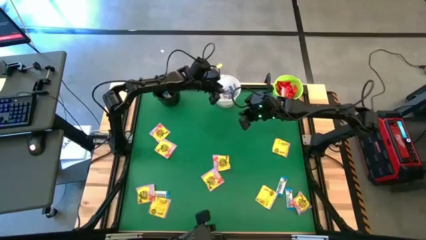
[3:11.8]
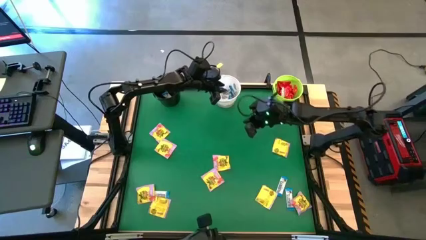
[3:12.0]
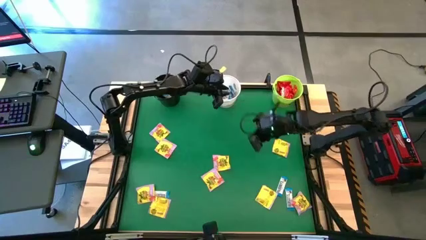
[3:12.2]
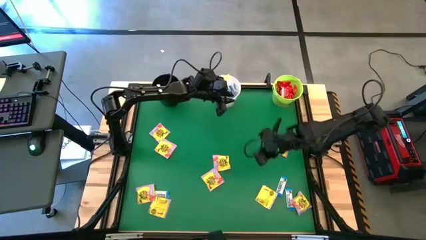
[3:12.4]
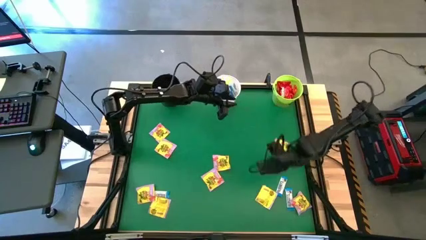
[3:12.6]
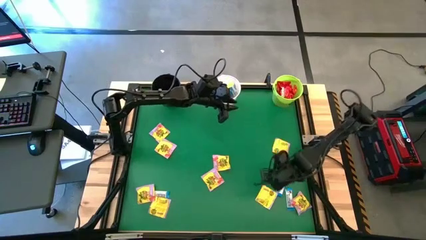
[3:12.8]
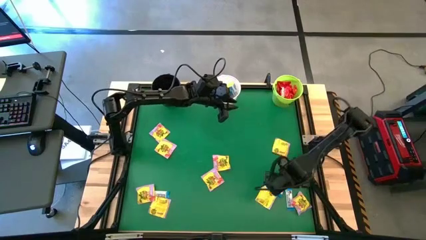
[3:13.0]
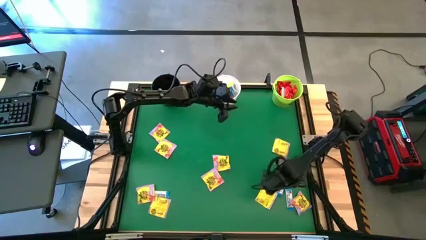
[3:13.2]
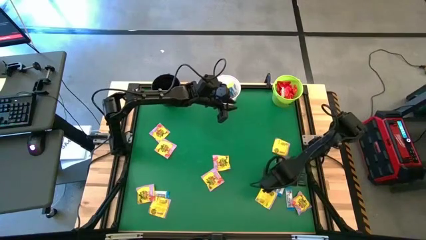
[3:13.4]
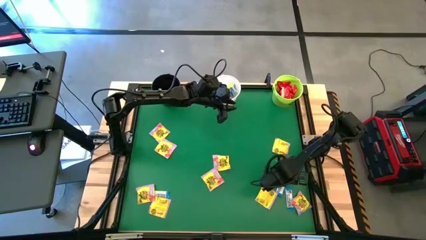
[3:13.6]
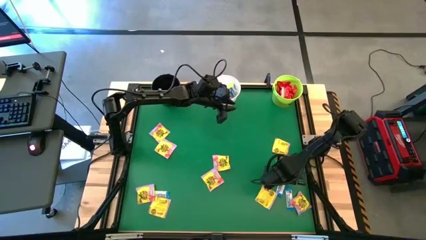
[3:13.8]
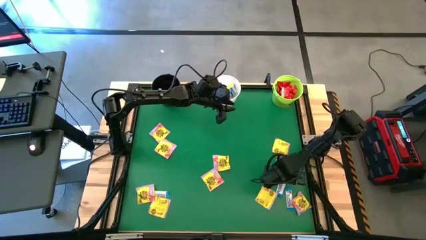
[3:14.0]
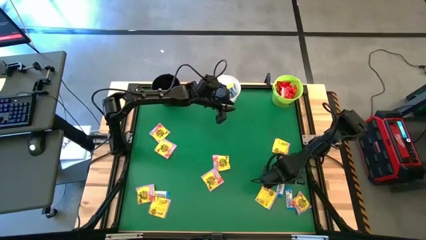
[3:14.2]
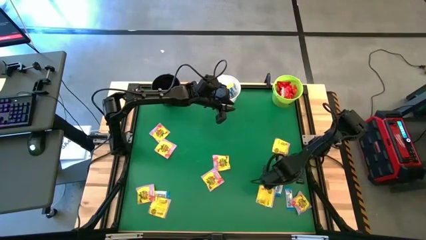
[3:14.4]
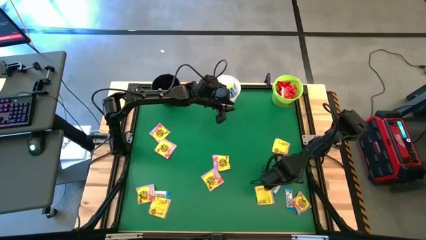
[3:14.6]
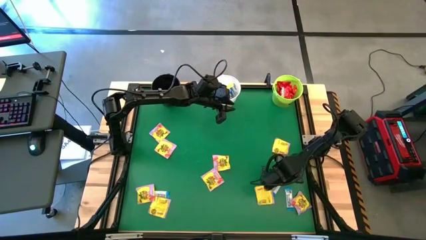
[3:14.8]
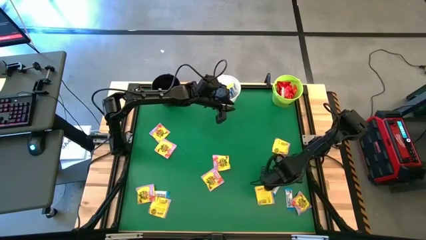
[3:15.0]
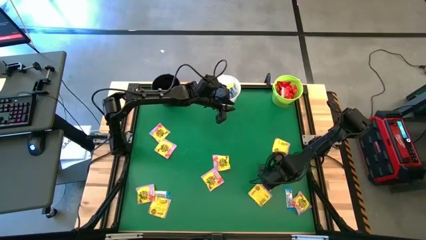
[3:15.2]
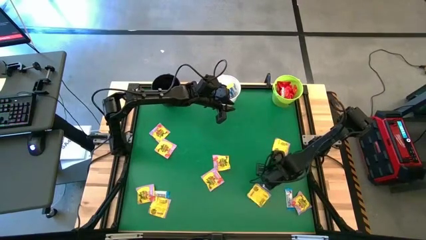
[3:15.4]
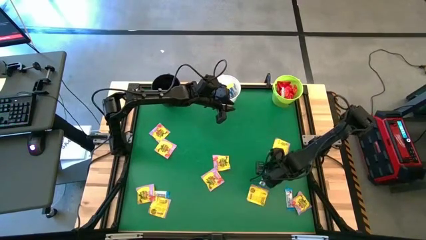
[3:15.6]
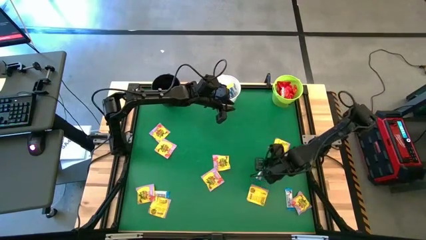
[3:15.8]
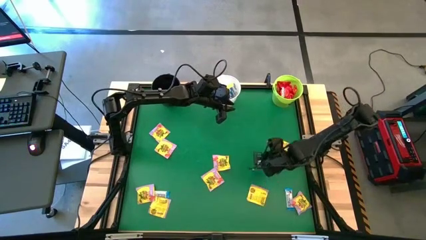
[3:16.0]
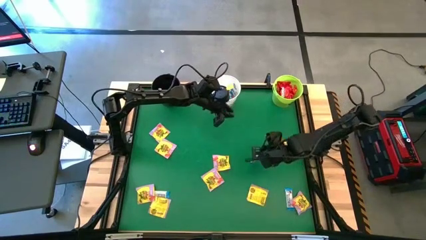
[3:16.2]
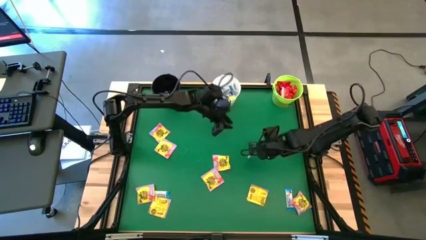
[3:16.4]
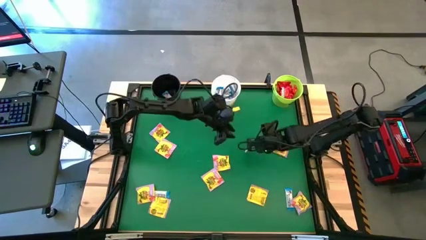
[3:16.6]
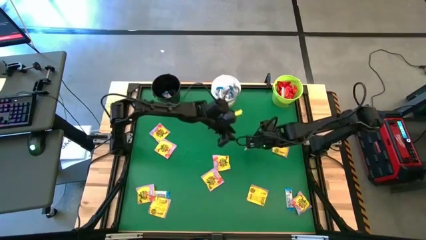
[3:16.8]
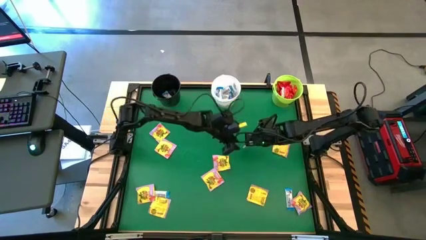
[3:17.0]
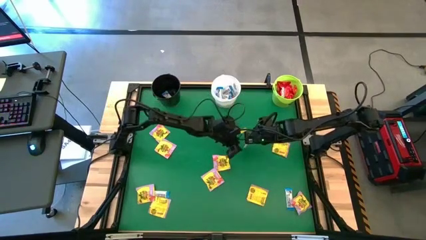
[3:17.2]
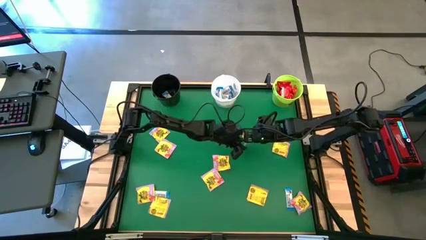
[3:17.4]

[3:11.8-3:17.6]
Task: Sort candy by brand, put in halloween buckets
Put the white candy into the white bucket

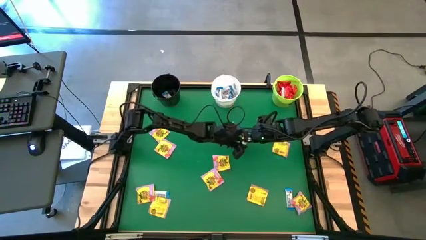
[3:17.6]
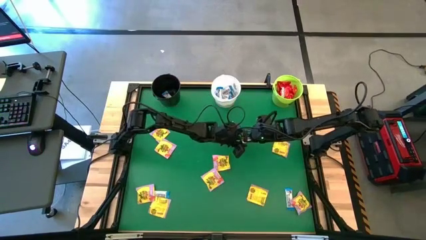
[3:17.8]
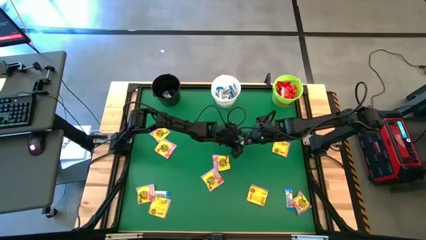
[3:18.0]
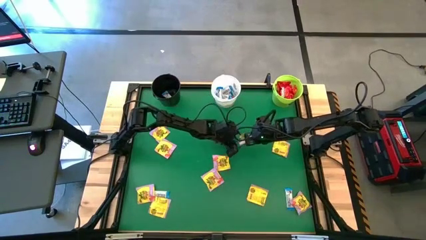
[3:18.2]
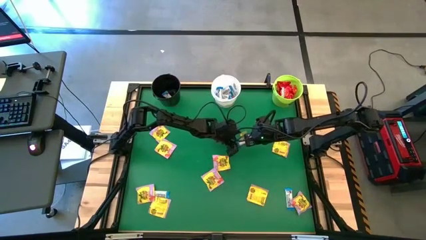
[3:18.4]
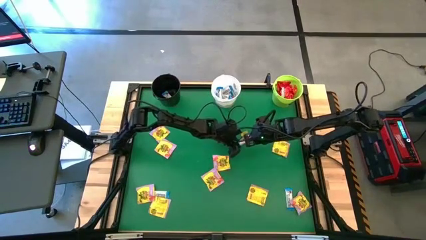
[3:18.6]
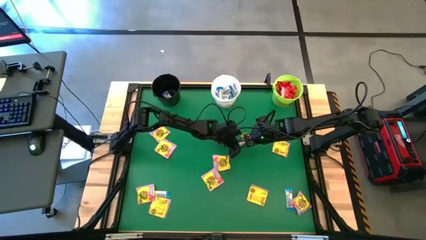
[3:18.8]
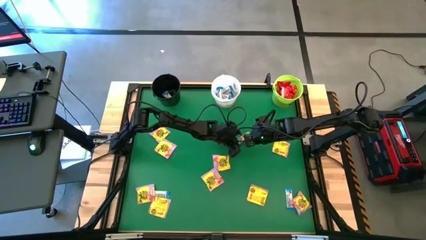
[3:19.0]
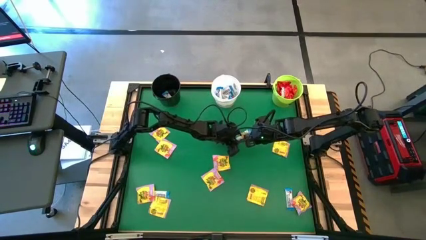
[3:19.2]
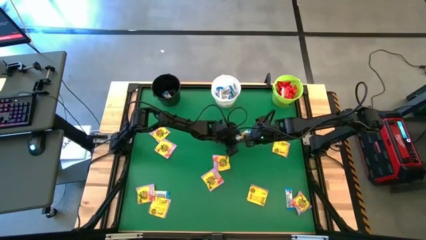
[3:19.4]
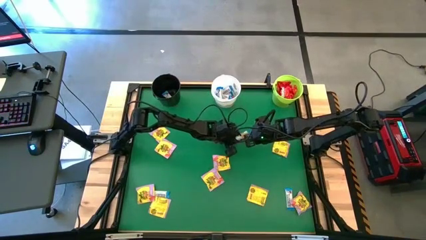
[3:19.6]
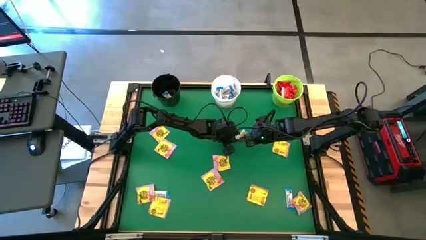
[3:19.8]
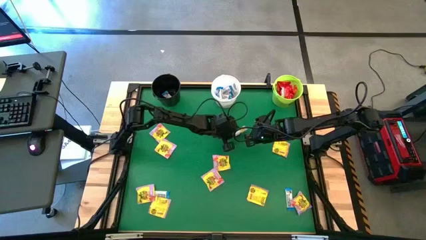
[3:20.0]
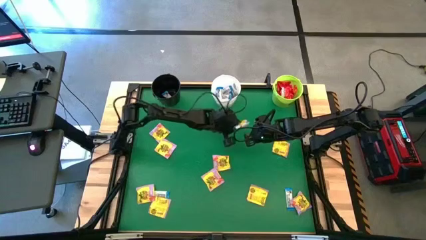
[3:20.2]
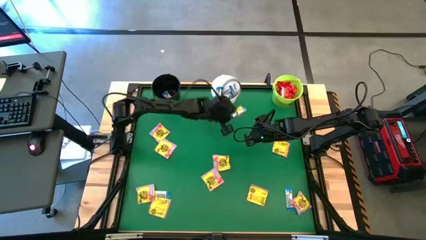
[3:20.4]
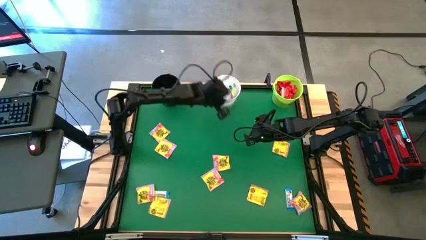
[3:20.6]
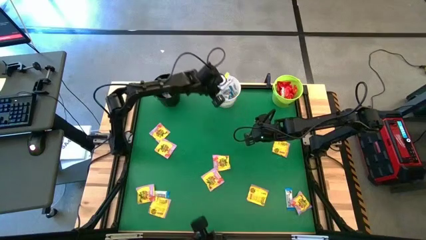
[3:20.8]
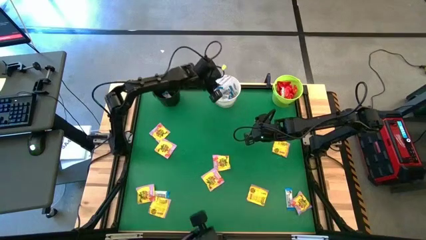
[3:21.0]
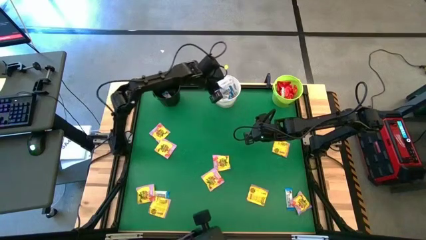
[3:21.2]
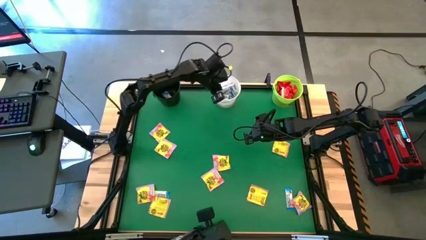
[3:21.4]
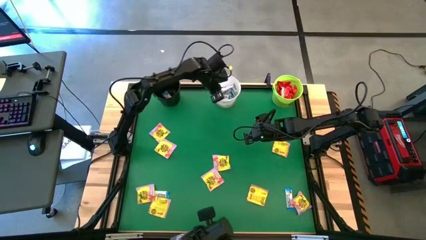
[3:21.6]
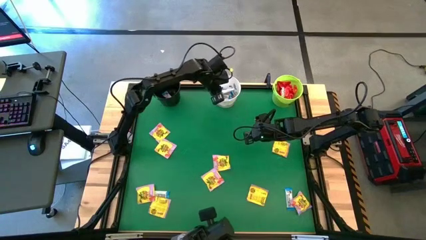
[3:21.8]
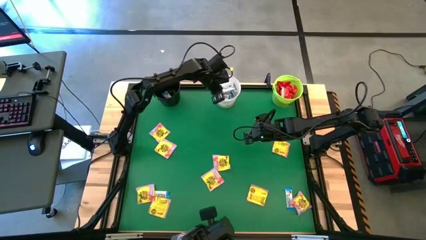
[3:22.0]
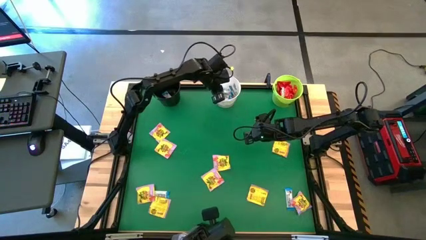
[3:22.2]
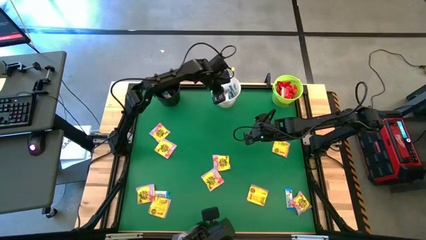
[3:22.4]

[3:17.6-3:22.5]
Put the white candy into the white bucket

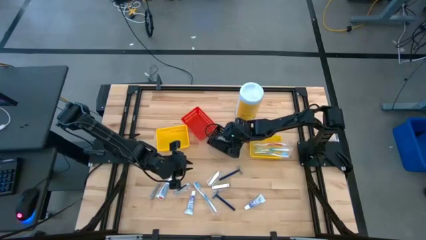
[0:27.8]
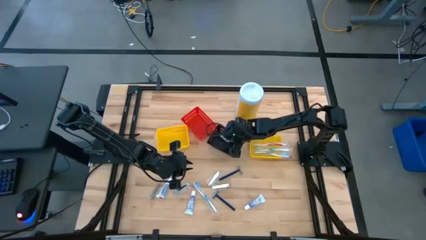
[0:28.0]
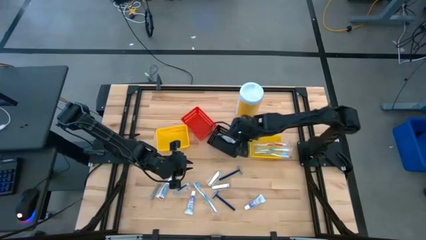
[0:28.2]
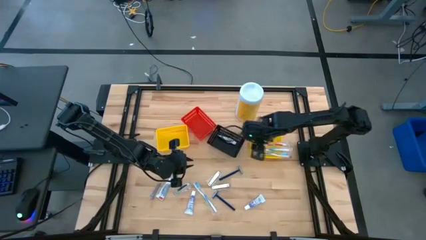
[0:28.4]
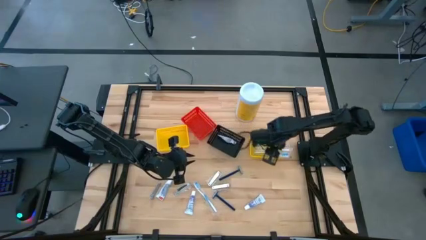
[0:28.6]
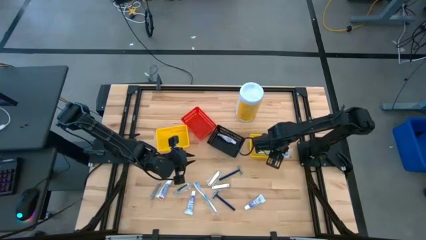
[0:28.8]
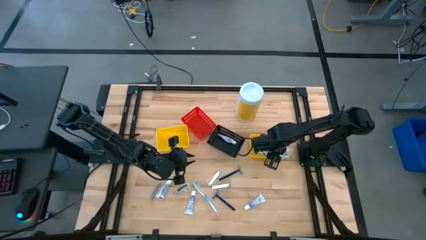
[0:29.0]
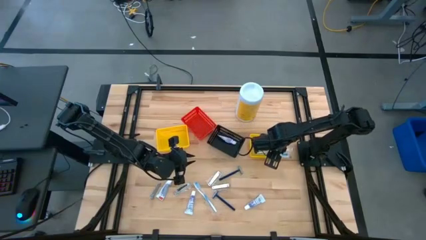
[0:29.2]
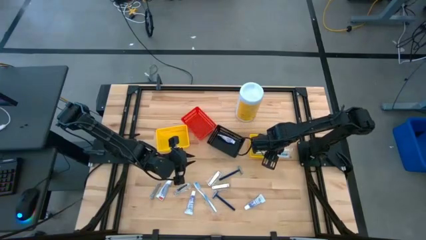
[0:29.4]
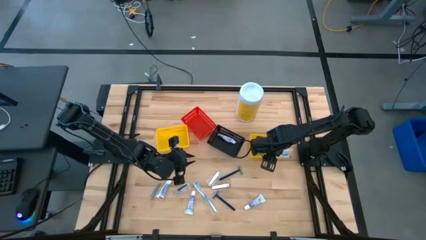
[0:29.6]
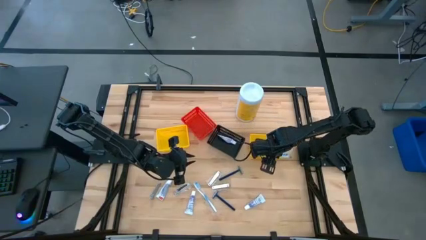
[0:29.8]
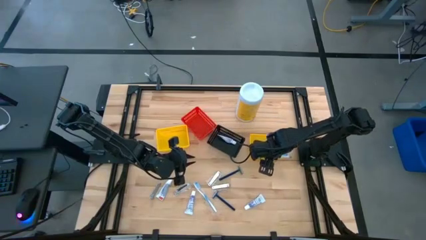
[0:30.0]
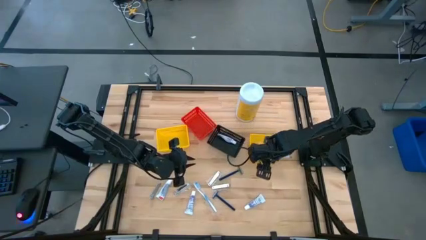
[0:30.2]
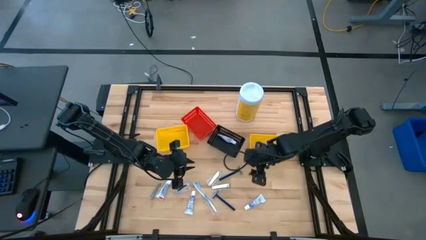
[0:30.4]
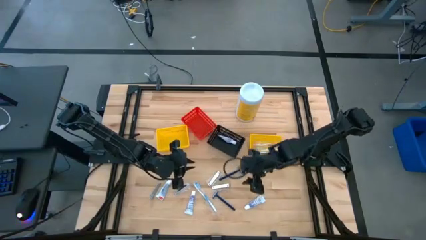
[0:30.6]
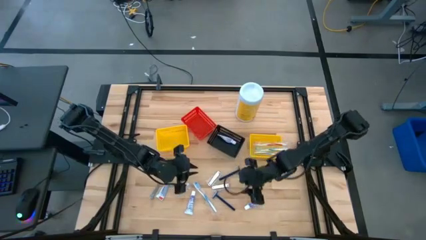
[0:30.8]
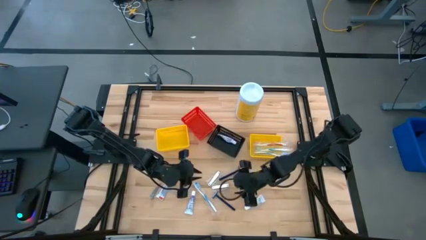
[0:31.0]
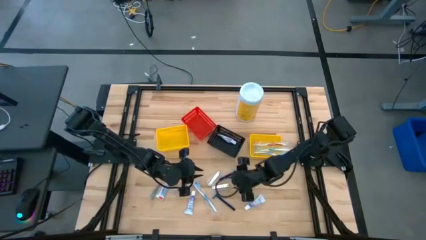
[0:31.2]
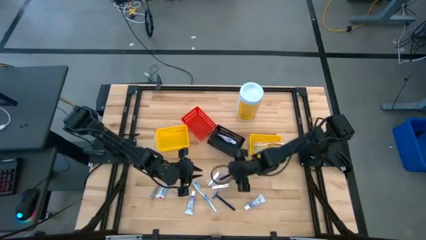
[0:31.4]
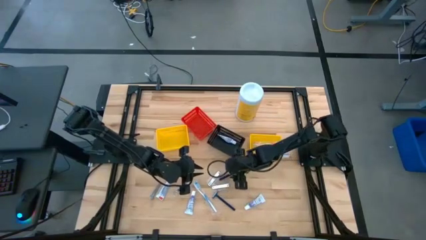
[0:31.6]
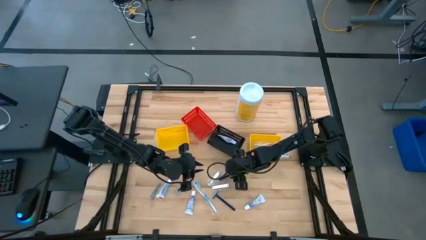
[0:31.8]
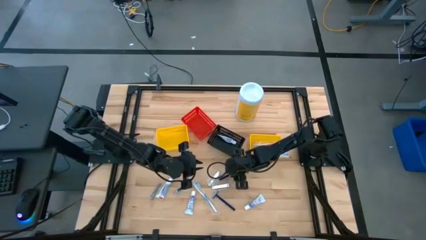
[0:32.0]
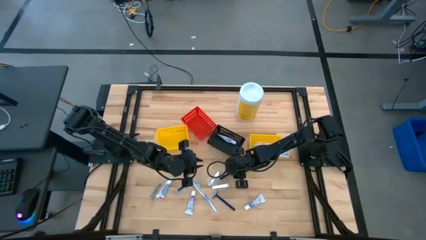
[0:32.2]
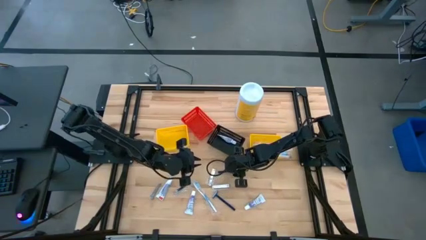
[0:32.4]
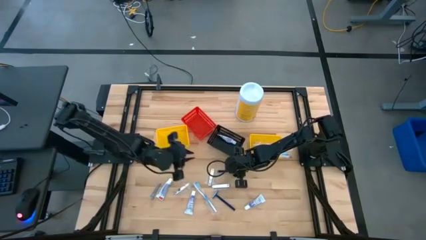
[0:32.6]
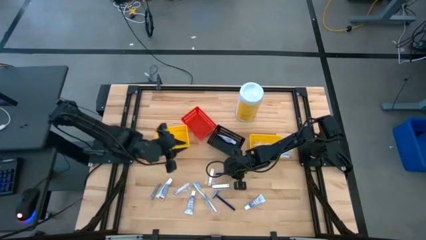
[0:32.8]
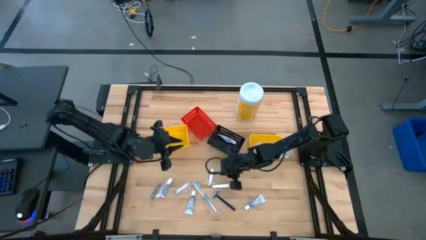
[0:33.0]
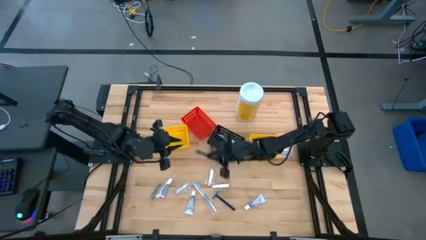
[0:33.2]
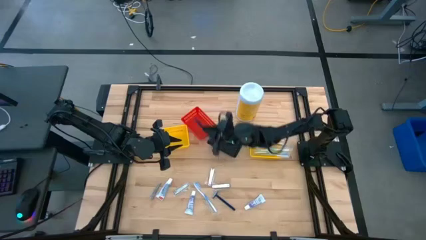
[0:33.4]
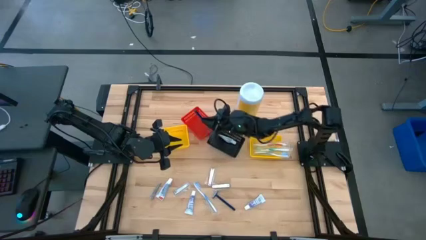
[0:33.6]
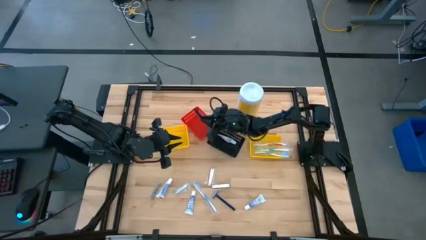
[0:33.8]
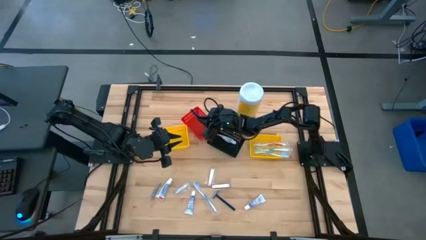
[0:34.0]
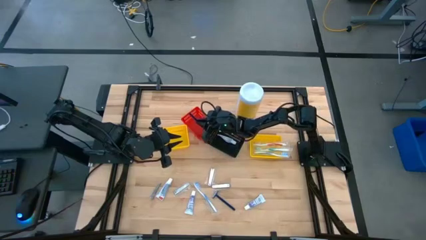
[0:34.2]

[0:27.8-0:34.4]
Task: Pick & Place Travel size toiletries
Put the razor into the red bin
